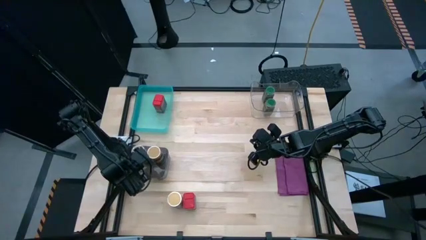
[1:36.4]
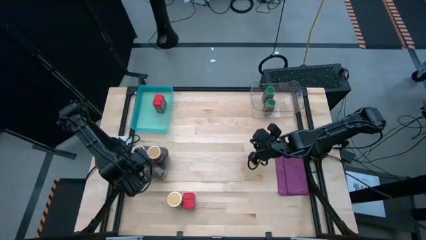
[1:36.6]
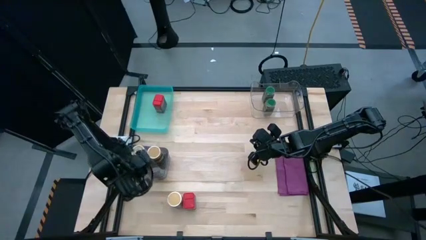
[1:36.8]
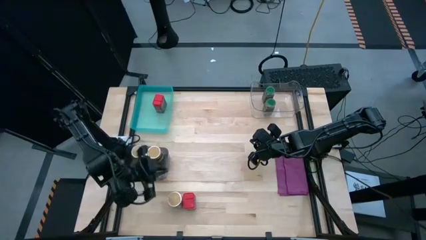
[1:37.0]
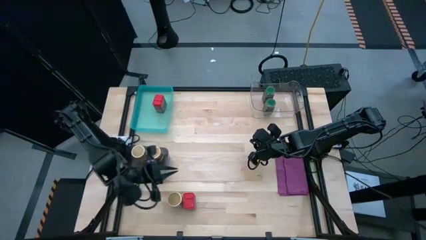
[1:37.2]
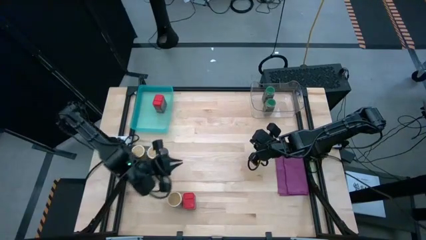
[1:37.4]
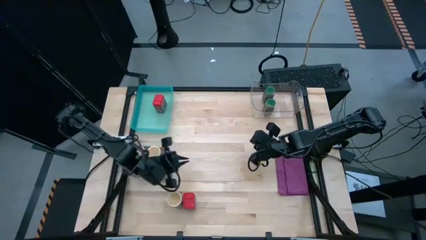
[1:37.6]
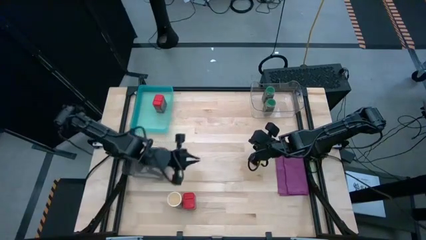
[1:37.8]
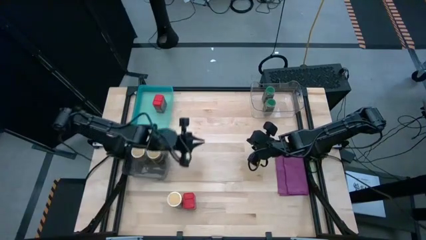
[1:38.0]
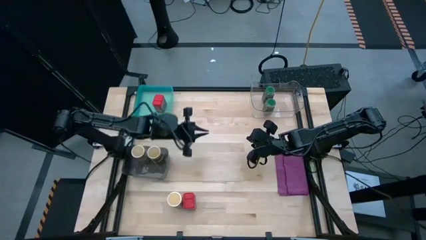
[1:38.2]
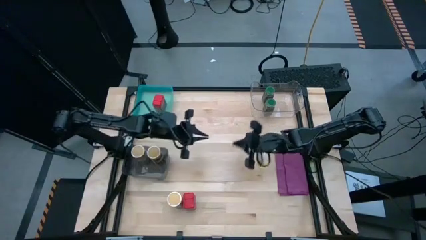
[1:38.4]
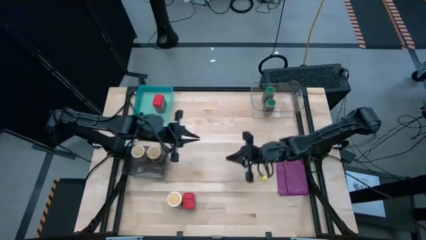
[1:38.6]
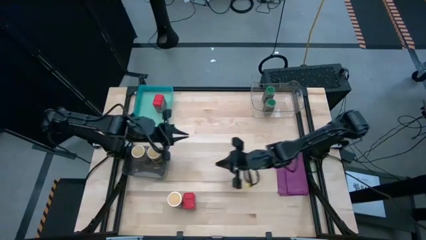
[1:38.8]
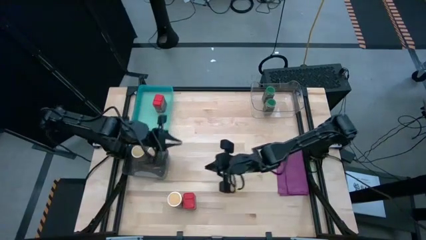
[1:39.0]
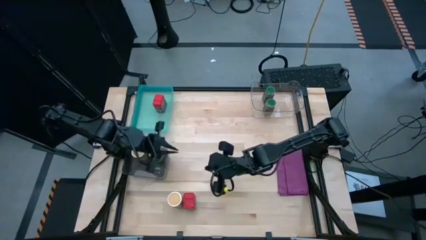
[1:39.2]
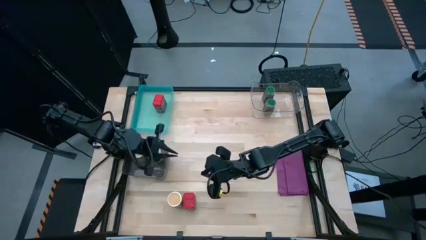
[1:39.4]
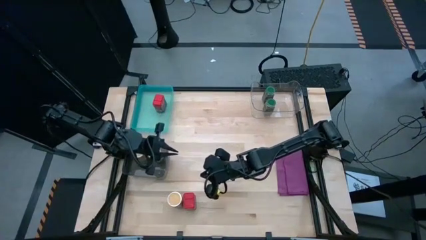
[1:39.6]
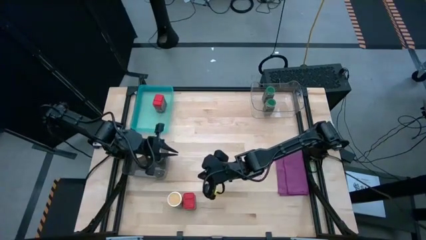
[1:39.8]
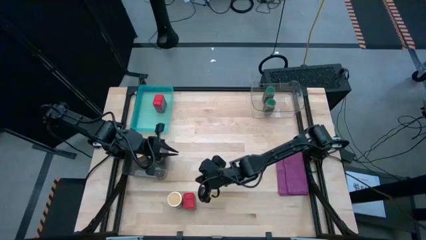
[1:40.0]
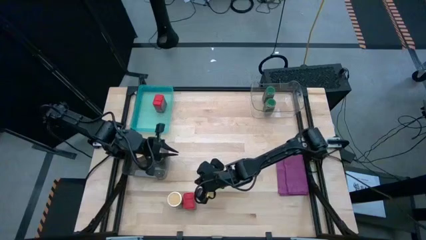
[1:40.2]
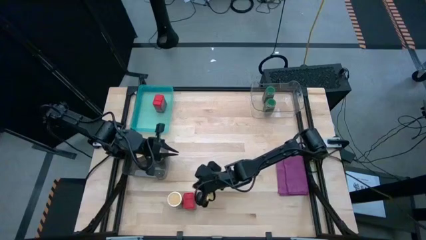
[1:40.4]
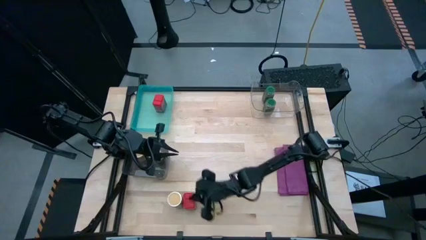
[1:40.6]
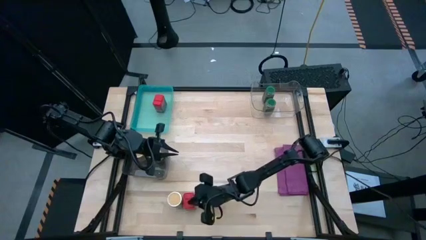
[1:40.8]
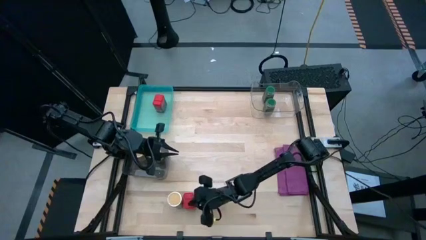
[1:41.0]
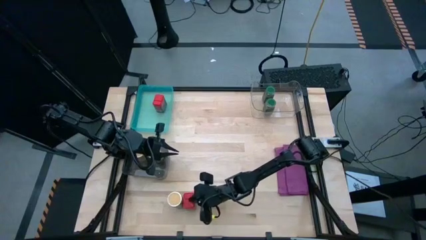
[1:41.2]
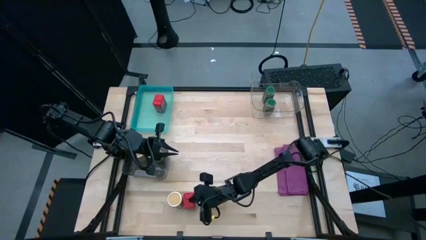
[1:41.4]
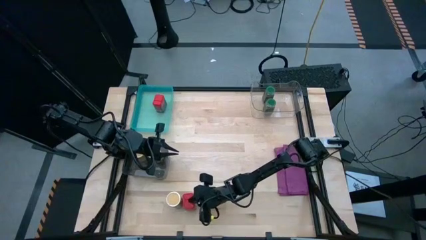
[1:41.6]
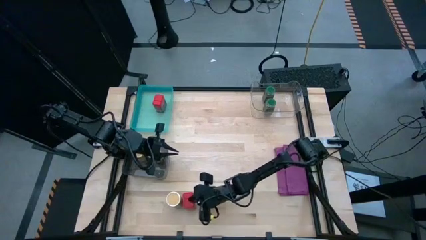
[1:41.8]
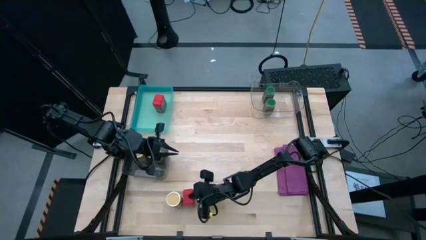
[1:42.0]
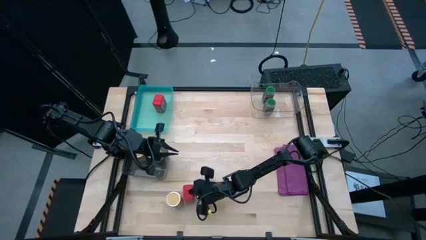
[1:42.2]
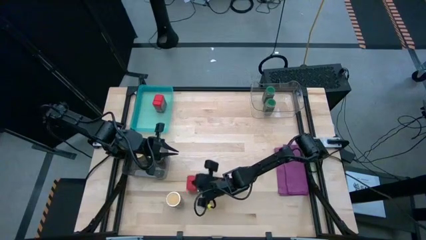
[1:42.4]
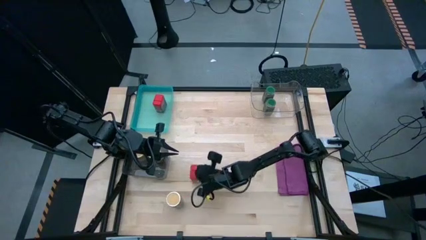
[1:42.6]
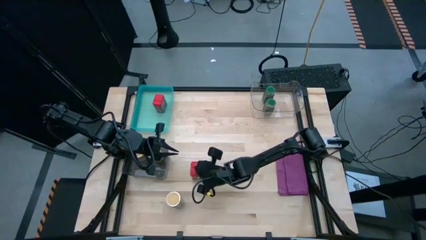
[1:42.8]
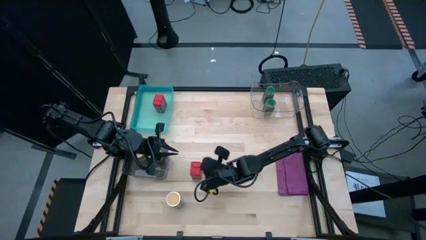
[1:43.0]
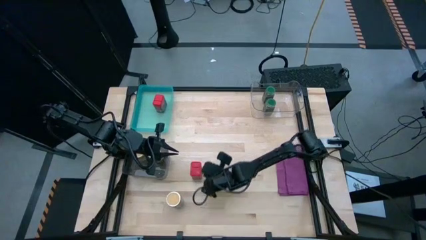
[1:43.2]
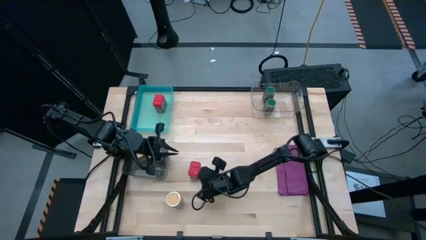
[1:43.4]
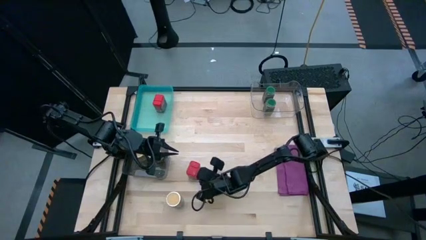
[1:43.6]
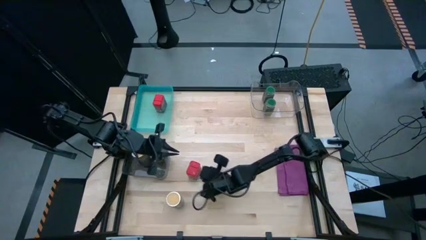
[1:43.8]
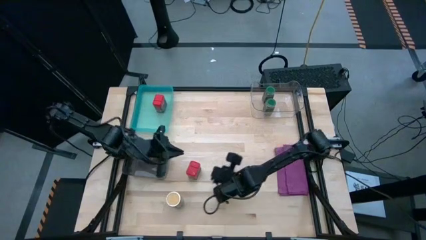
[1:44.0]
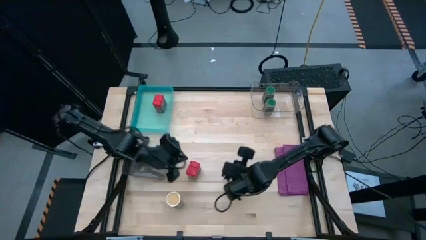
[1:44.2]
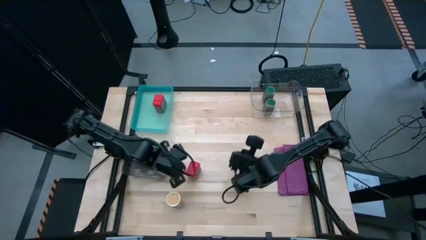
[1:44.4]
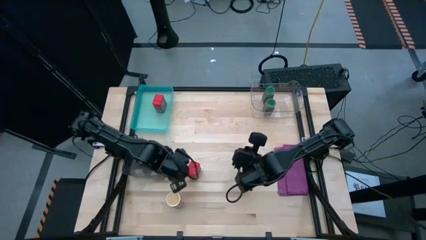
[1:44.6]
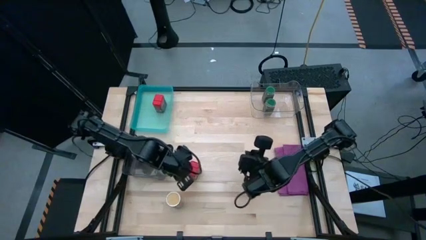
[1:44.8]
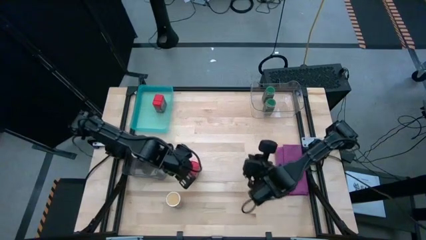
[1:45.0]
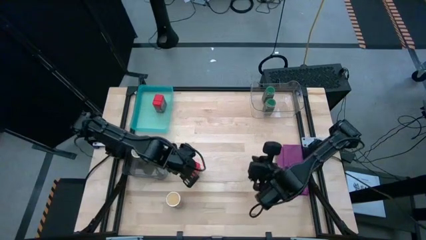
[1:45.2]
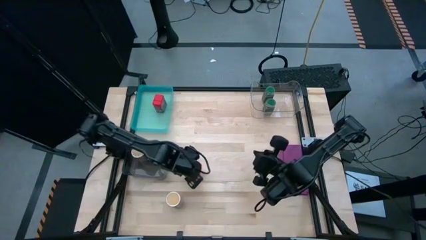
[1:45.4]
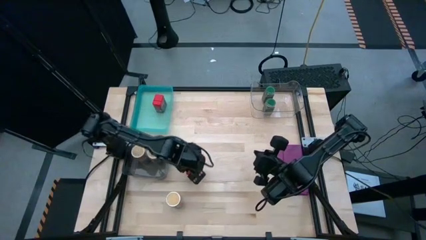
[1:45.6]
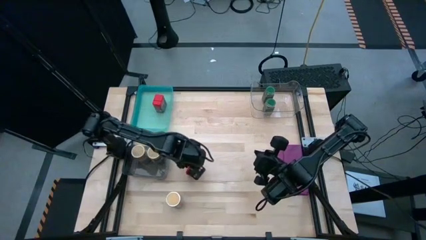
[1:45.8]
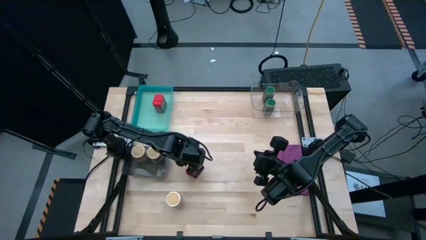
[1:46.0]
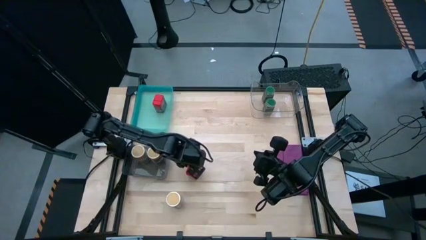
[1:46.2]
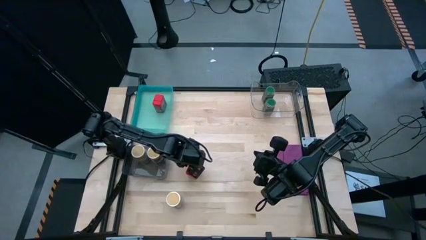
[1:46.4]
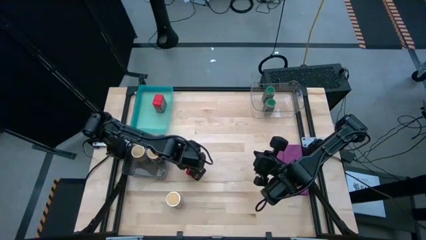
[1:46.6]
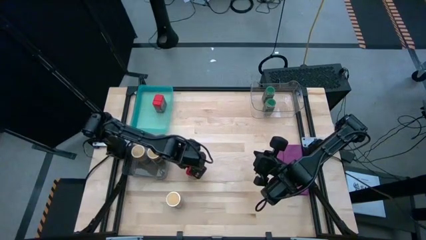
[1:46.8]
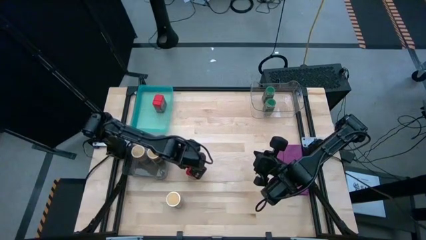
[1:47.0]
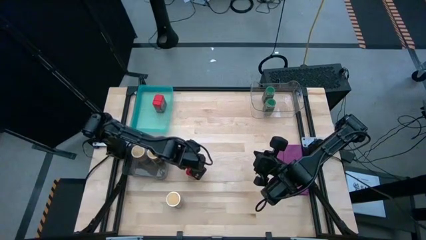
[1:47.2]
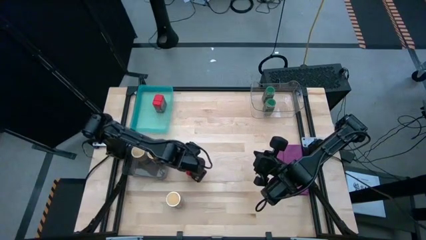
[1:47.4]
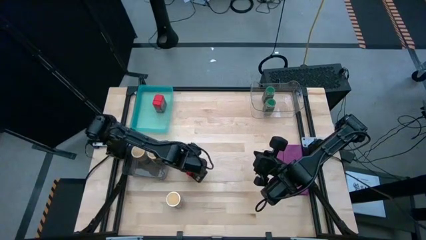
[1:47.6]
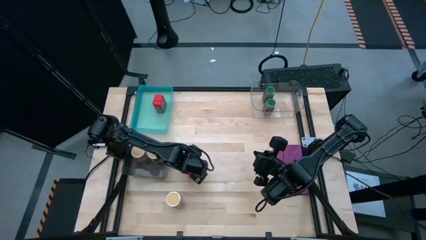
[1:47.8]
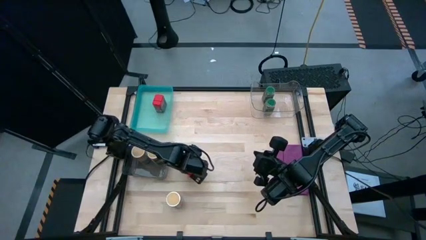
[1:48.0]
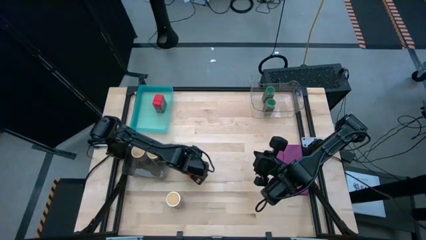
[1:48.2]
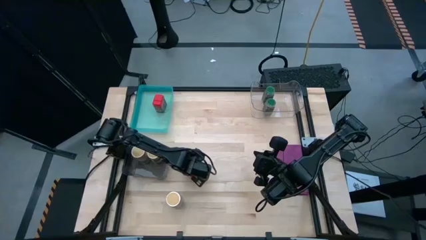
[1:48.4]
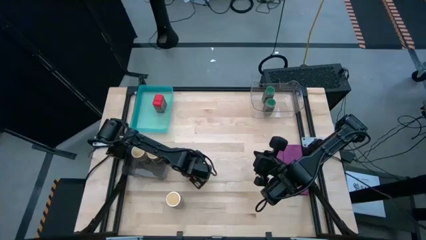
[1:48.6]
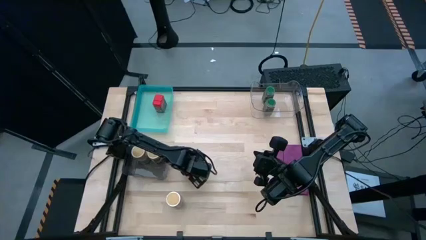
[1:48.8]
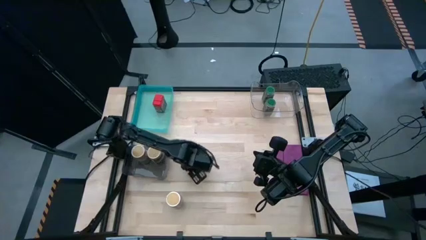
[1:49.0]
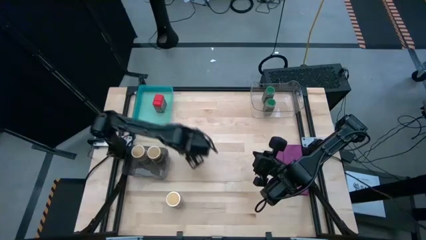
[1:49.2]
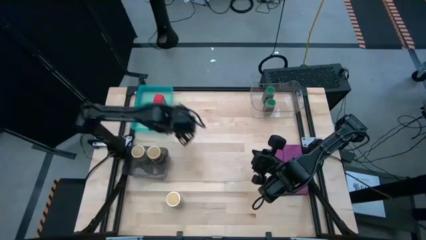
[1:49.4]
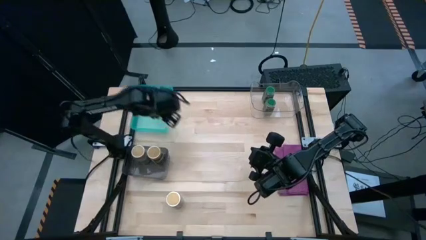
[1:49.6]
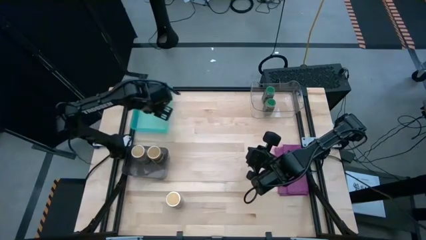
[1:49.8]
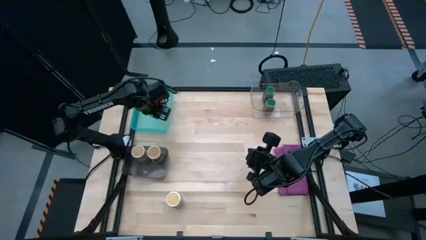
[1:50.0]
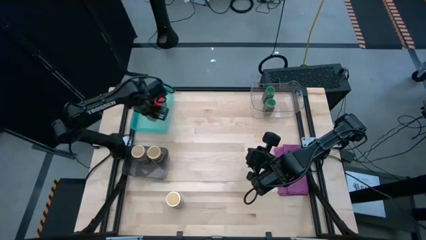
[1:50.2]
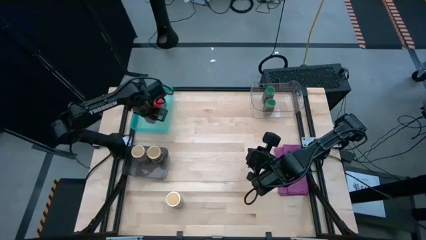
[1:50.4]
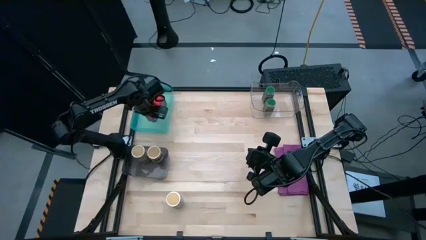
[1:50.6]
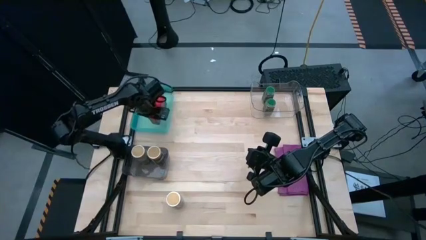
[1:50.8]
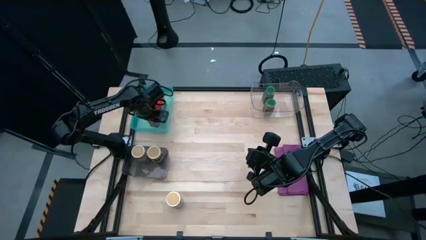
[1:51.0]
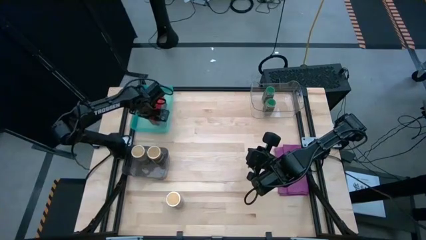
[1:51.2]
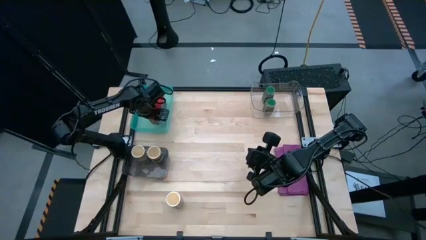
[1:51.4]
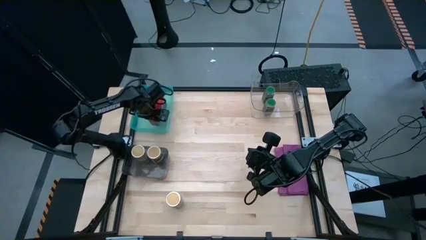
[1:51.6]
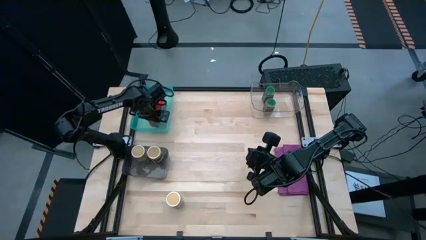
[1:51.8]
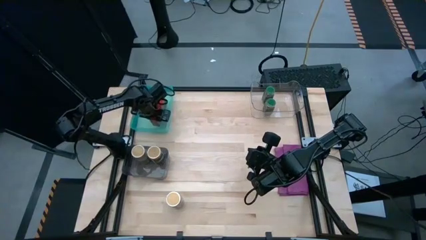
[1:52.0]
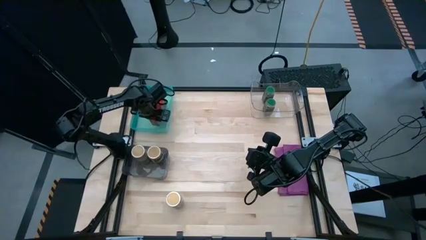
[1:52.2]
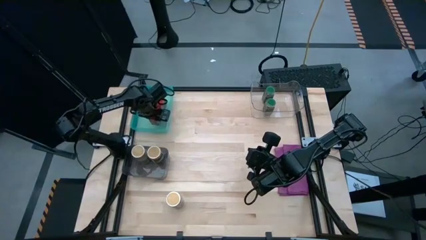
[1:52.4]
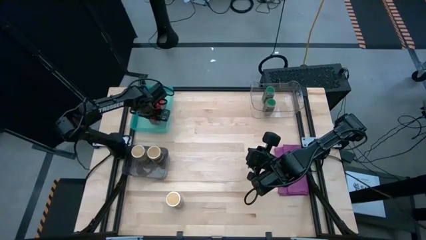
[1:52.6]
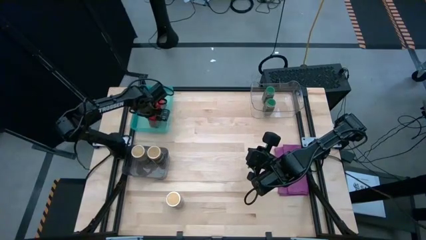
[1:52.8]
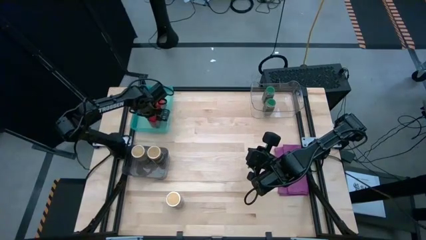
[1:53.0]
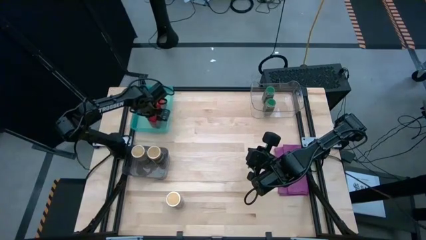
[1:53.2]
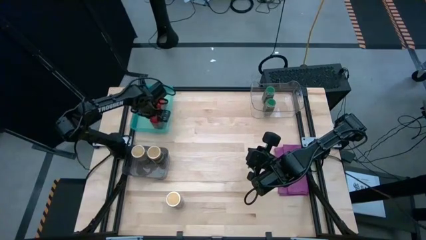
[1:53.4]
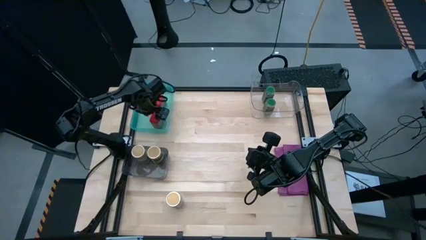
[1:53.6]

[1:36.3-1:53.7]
Task: Sort spices by type
Put the red seasoning can into the blue bin
